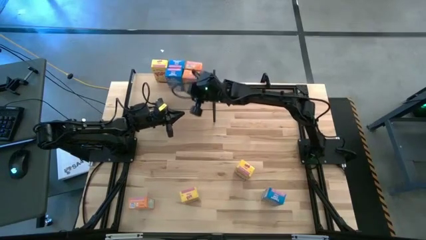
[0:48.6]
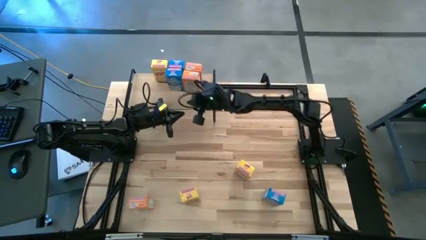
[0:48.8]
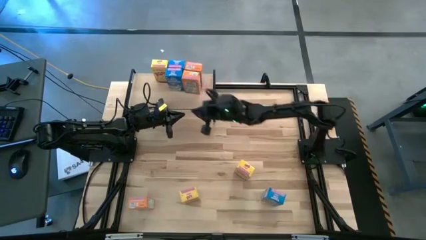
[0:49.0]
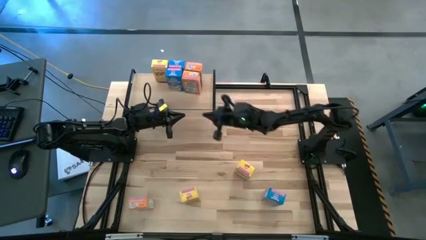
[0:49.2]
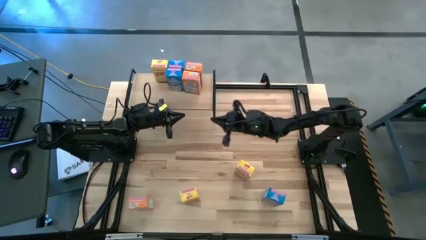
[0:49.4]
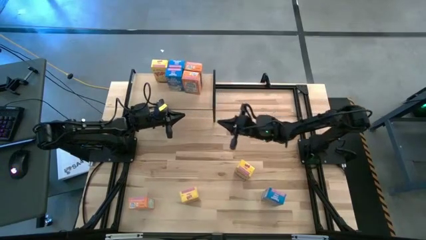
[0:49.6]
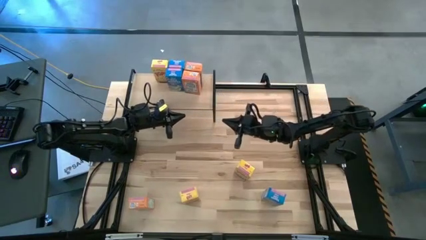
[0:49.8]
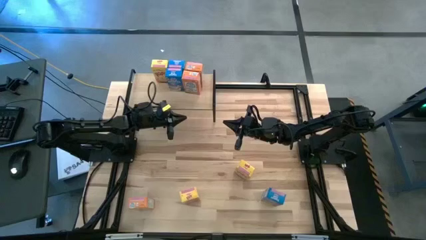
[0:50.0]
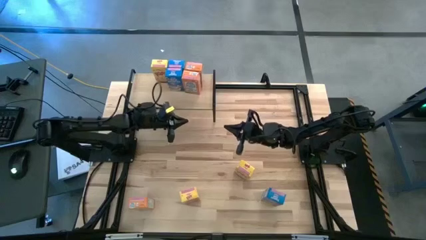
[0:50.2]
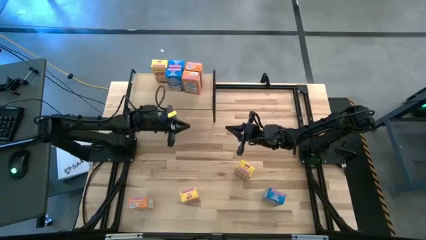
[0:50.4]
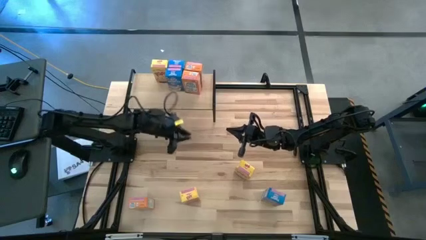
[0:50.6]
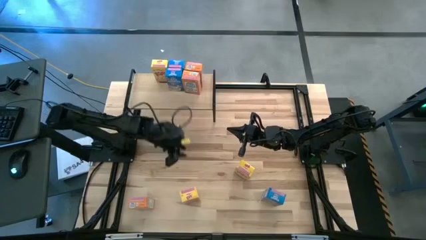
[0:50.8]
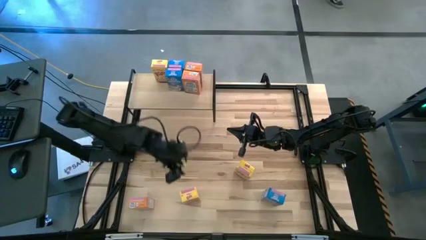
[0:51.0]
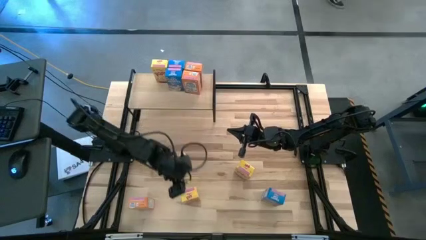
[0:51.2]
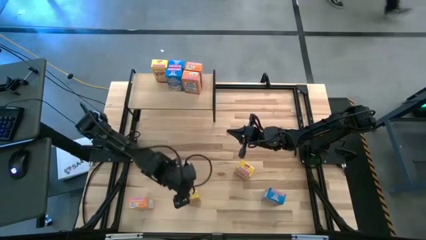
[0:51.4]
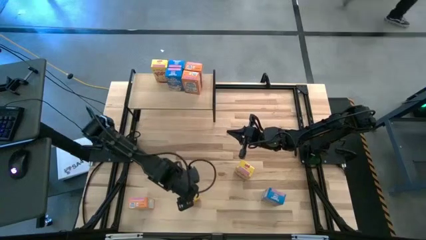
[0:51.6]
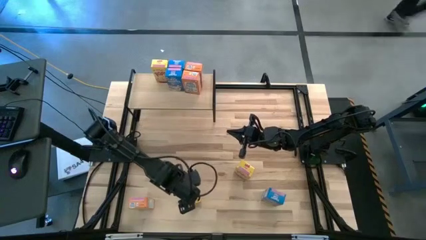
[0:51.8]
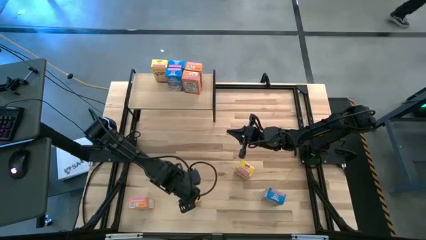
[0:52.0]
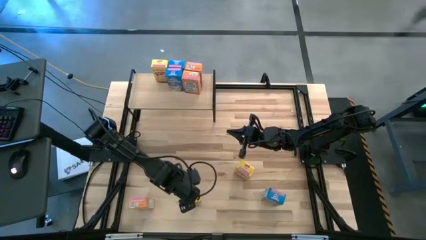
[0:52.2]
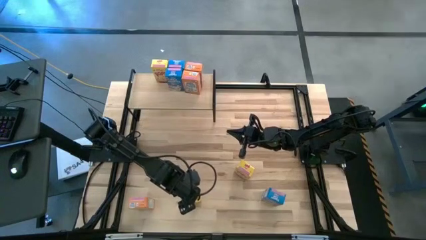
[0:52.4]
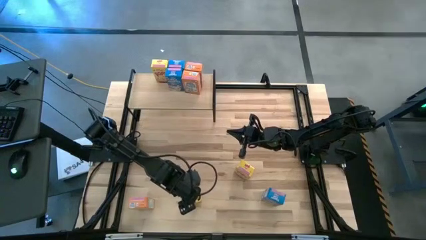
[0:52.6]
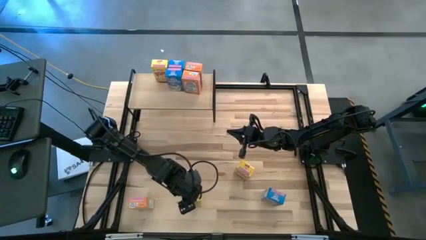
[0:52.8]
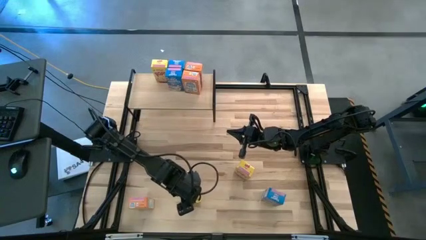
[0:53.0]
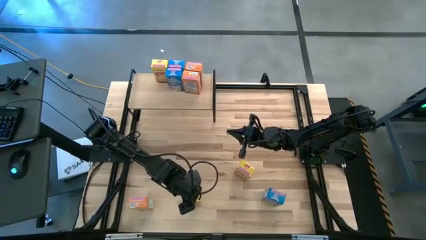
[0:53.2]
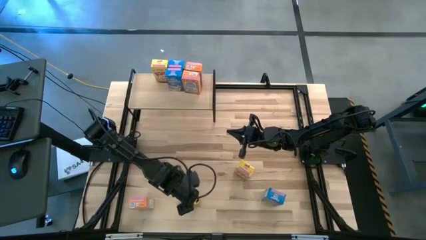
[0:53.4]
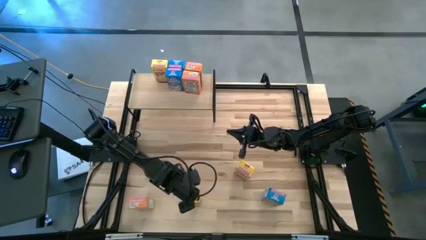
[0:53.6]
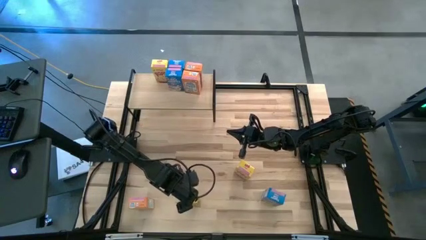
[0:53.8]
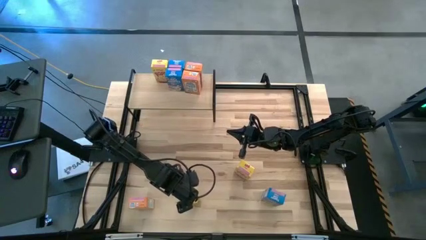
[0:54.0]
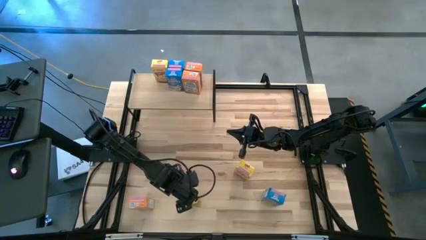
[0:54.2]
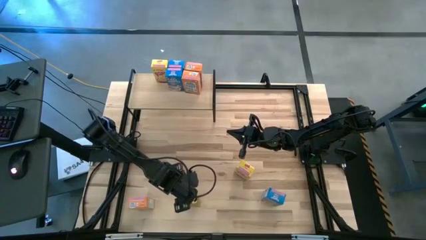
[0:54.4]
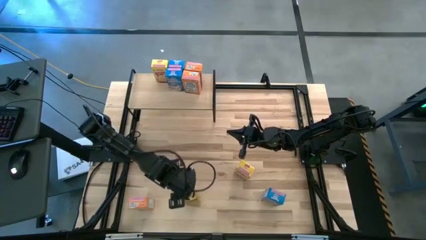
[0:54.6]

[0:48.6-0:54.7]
Task: Stack cereal on shelf
Put the left yellow cereal box on the shelf aligned with the other yellow cereal box

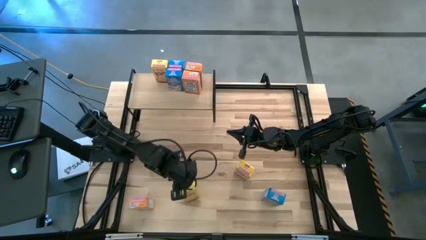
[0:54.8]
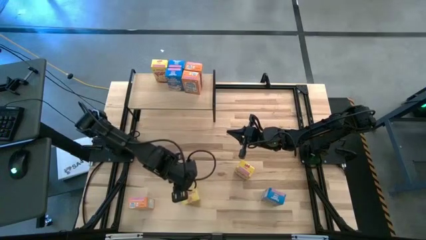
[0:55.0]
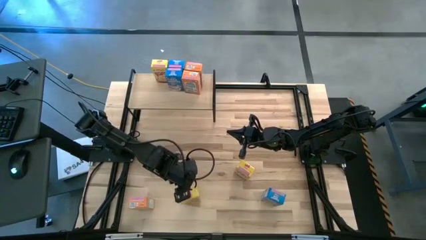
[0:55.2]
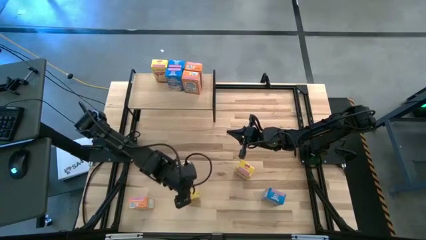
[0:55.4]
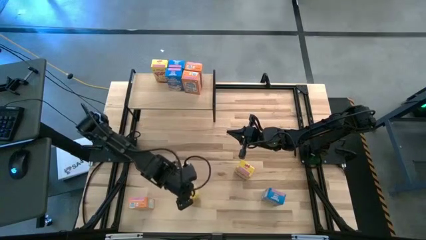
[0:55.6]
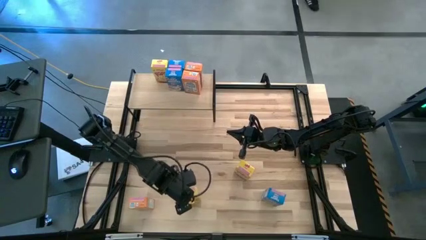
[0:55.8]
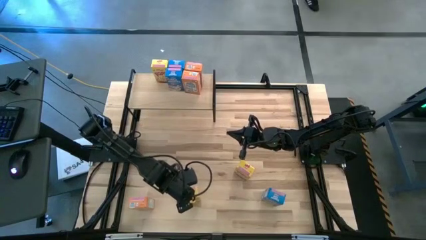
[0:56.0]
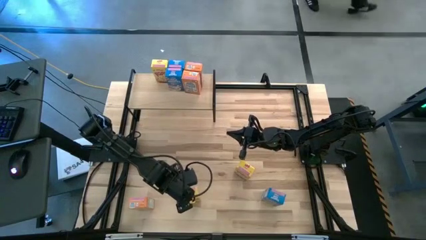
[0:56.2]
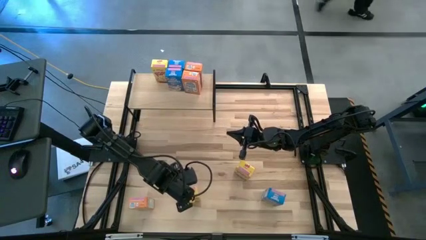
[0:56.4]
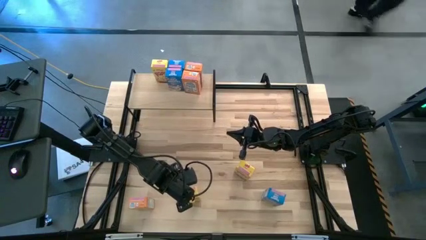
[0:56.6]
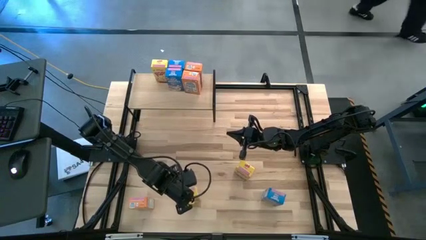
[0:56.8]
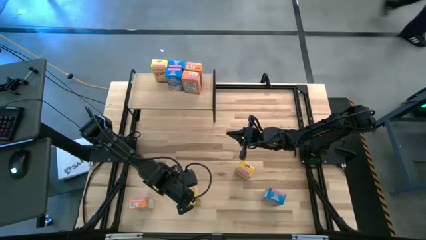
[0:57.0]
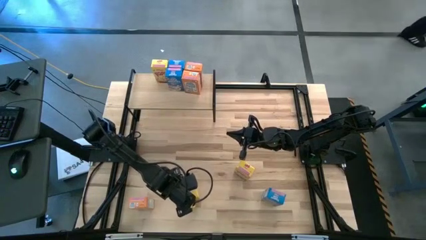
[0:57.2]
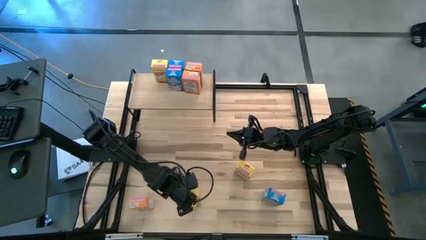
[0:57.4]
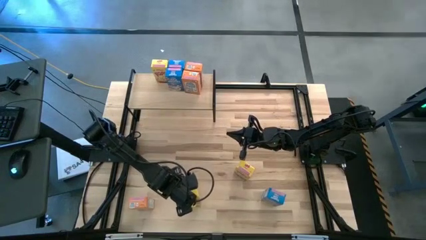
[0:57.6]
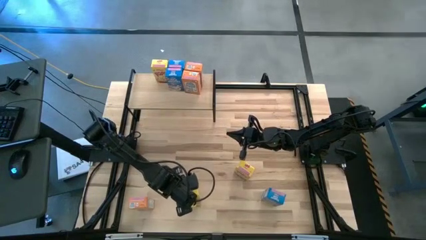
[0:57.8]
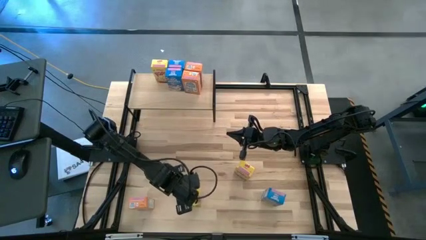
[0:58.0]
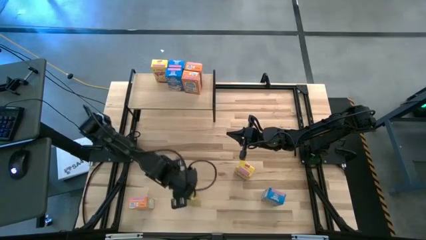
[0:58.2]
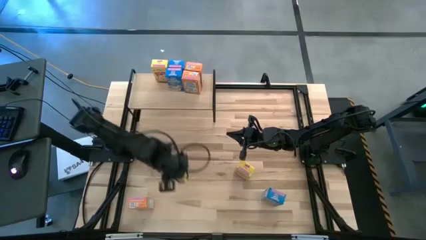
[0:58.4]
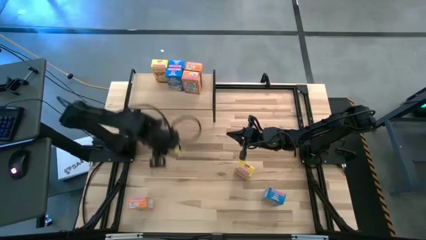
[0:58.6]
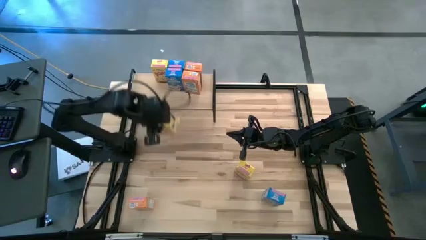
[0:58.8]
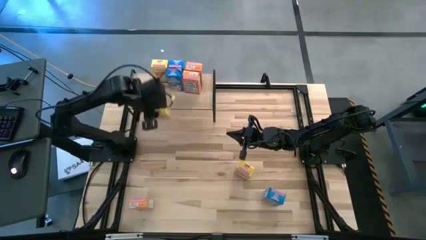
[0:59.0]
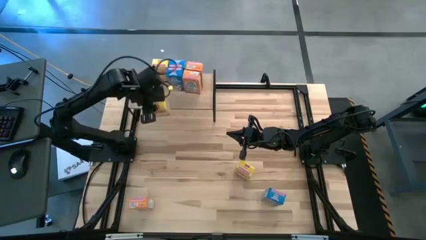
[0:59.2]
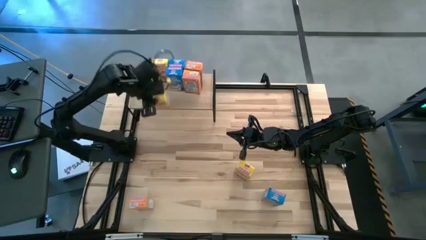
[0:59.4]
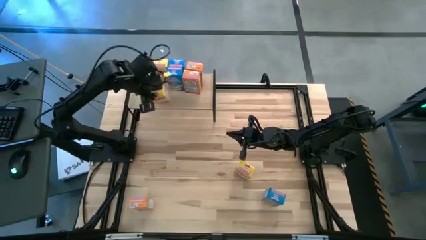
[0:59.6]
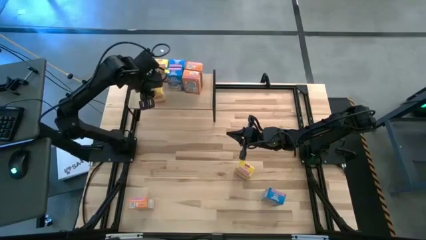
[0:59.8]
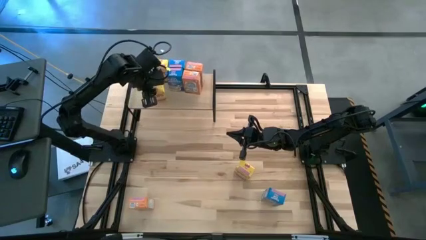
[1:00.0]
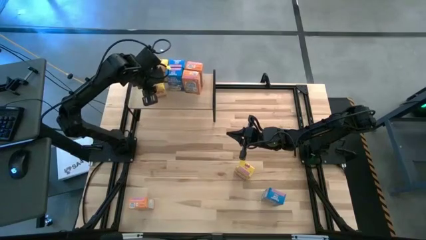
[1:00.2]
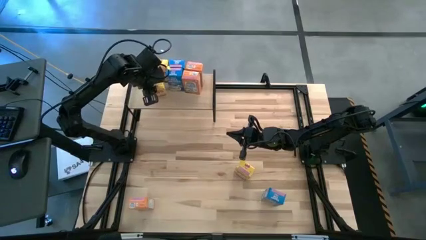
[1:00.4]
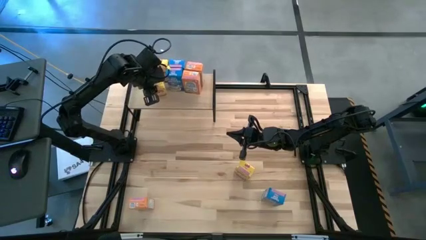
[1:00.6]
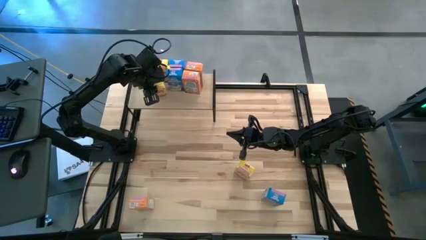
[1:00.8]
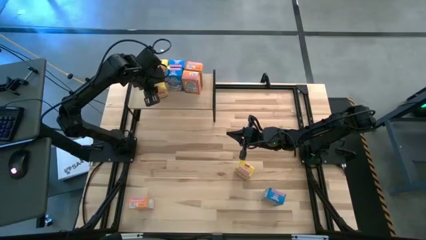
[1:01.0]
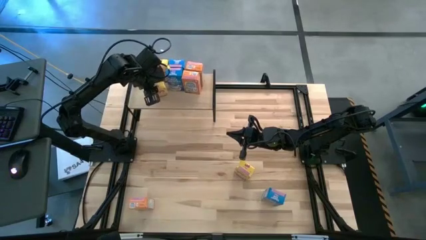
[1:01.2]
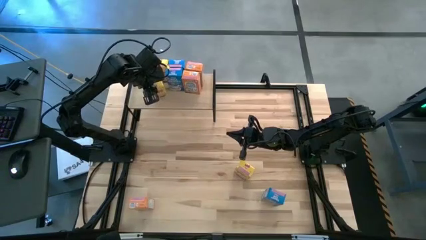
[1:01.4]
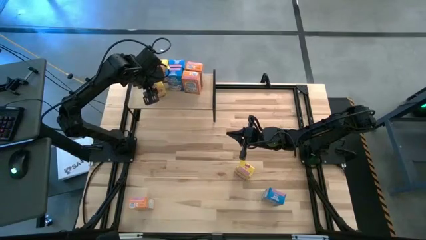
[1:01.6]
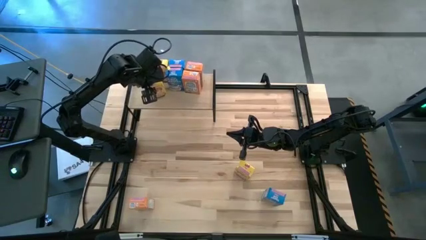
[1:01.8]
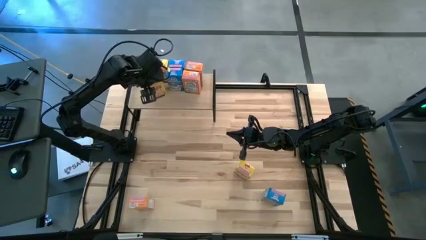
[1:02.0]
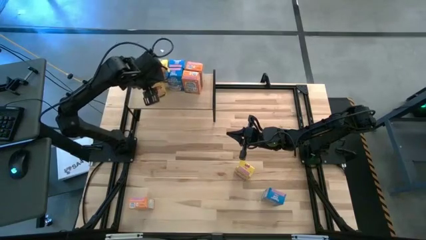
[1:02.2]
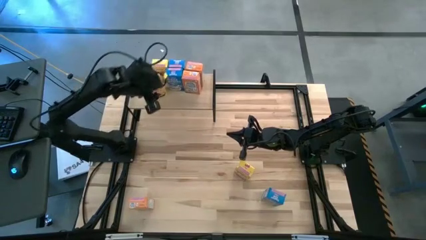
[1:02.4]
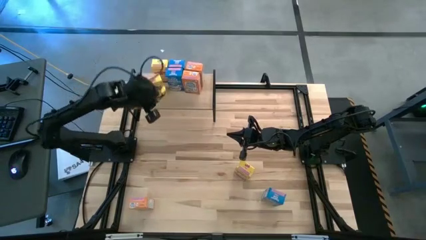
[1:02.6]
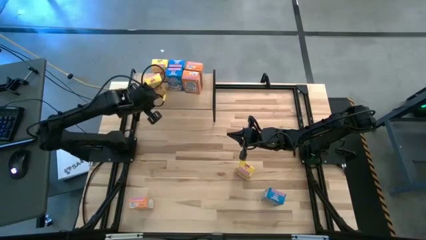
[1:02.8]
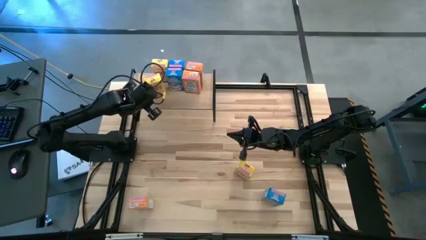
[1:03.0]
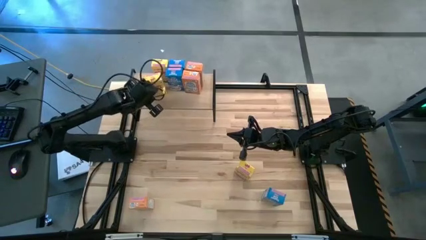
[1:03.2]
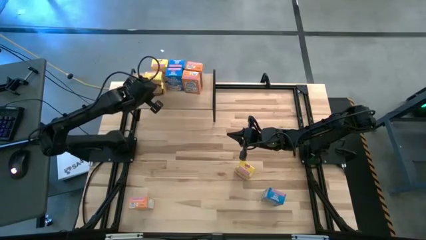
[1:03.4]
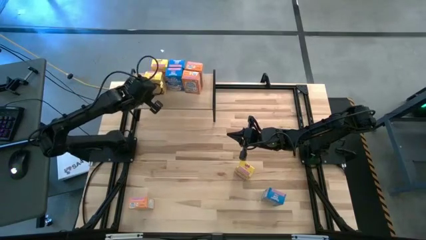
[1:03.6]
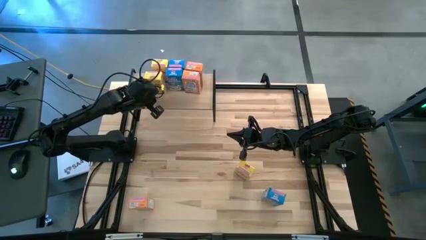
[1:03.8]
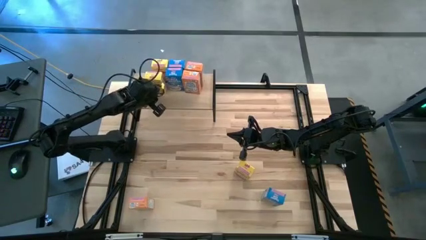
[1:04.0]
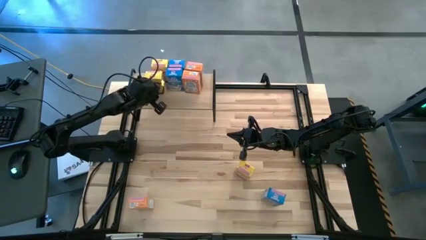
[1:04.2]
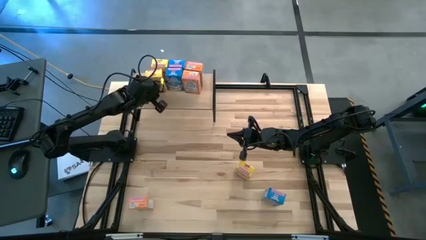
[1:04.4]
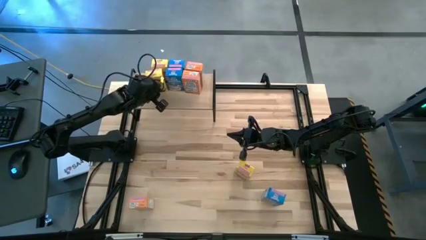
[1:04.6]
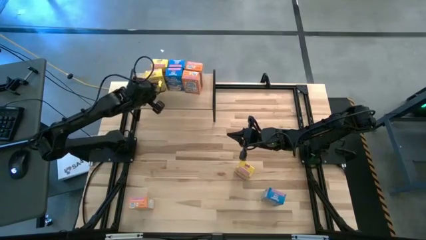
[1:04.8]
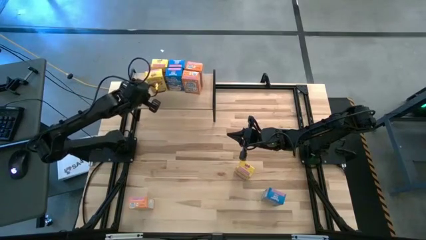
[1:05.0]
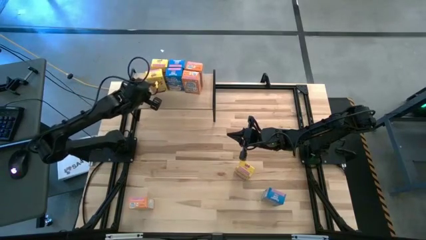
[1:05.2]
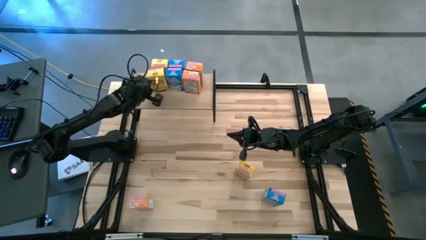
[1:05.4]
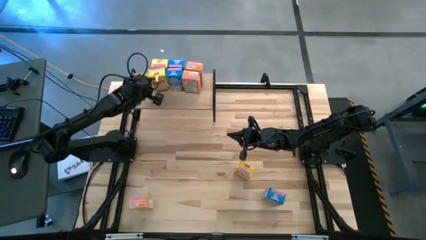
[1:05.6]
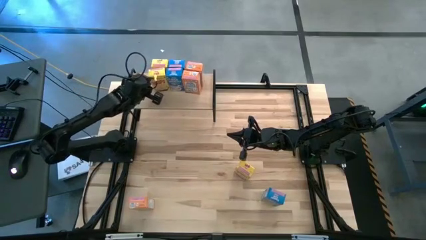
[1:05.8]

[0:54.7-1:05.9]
Put the left yellow cereal box on the shelf aligned with the other yellow cereal box
